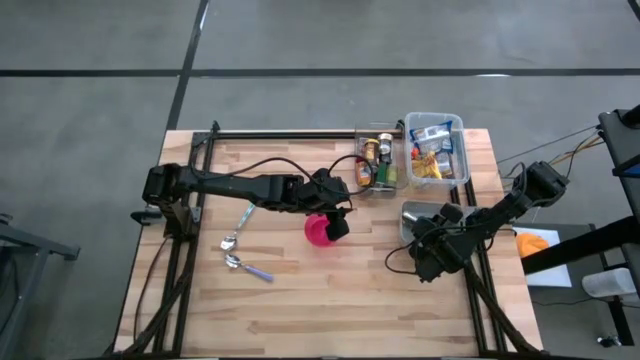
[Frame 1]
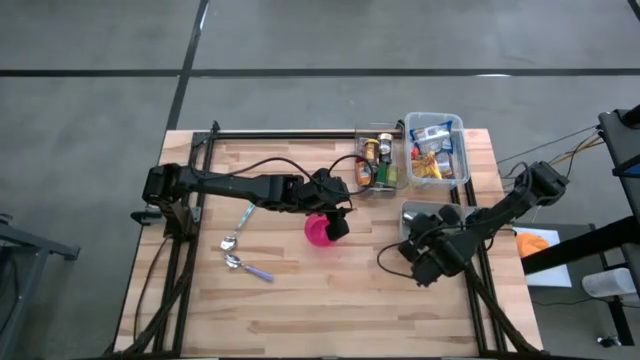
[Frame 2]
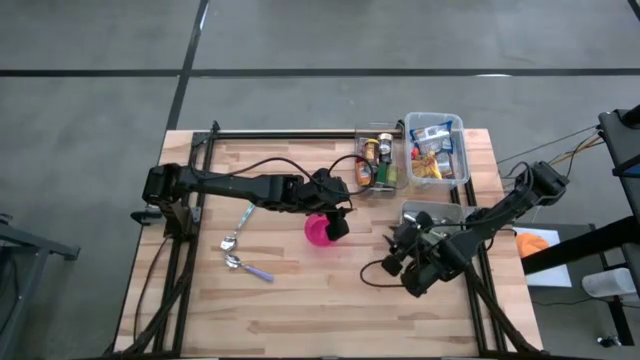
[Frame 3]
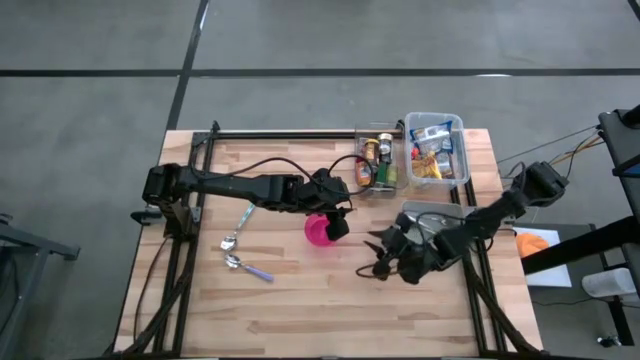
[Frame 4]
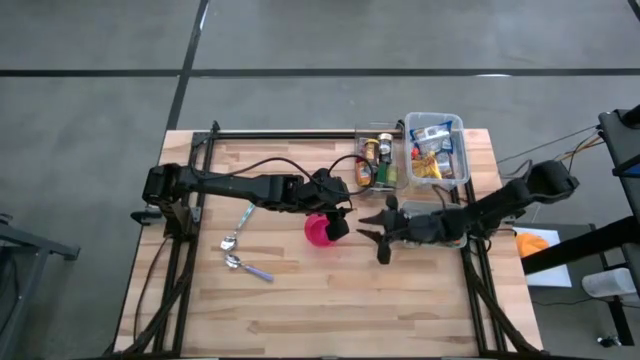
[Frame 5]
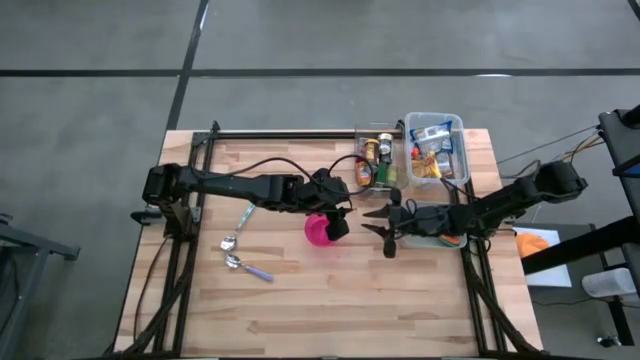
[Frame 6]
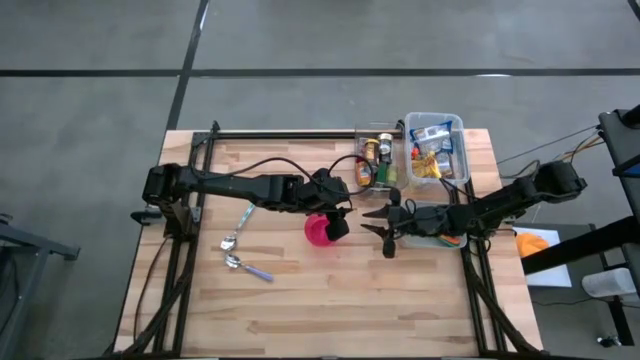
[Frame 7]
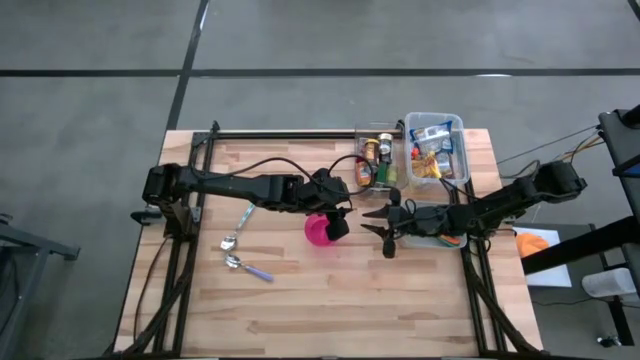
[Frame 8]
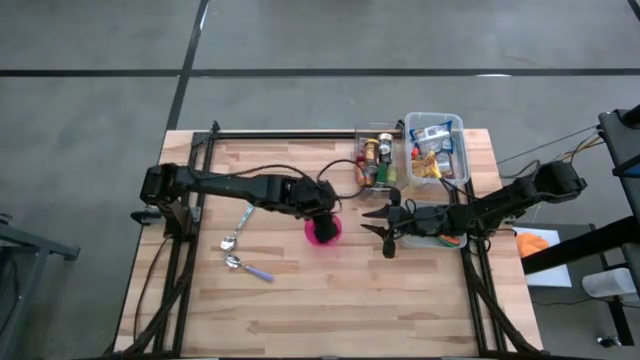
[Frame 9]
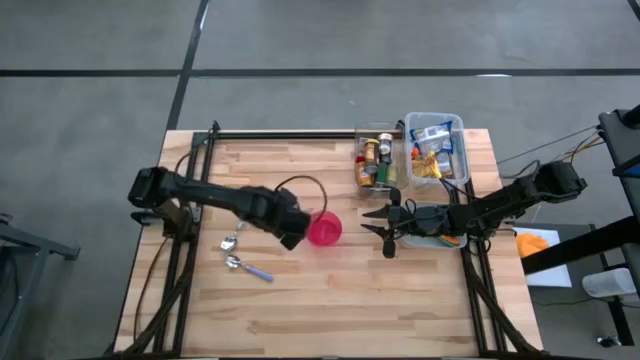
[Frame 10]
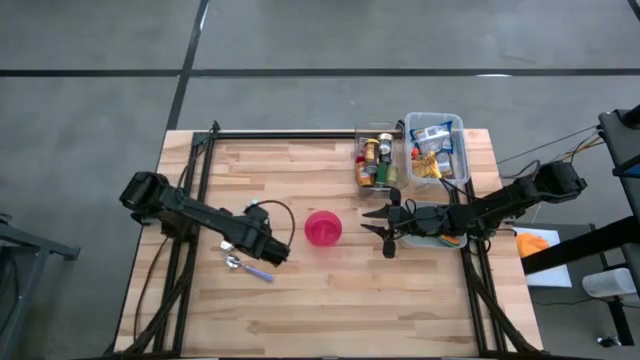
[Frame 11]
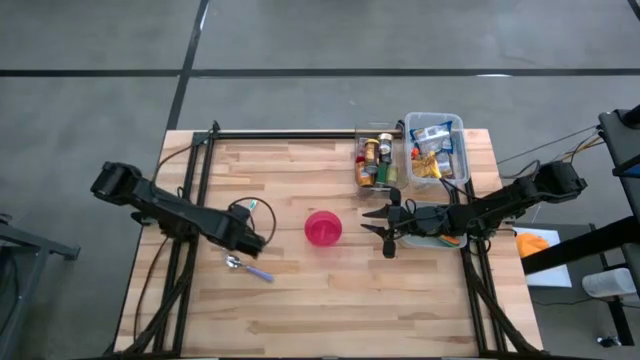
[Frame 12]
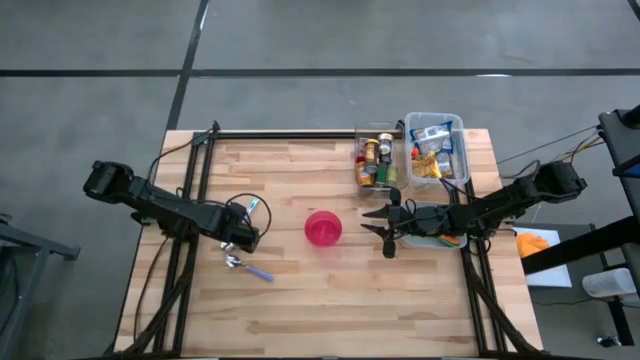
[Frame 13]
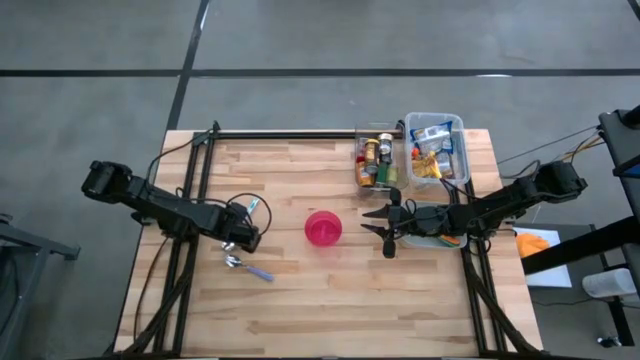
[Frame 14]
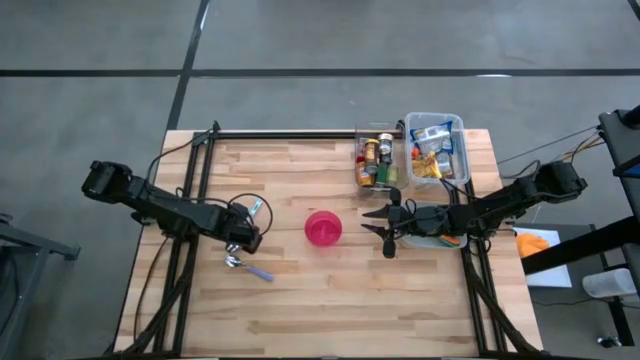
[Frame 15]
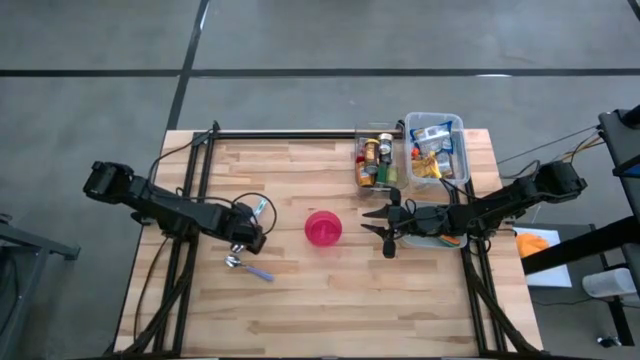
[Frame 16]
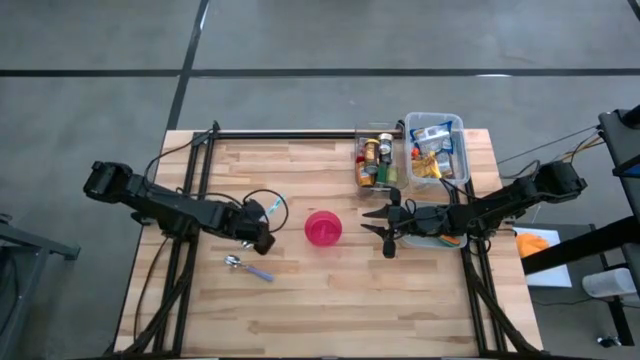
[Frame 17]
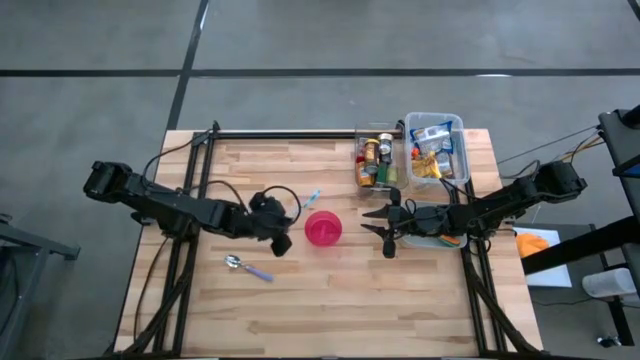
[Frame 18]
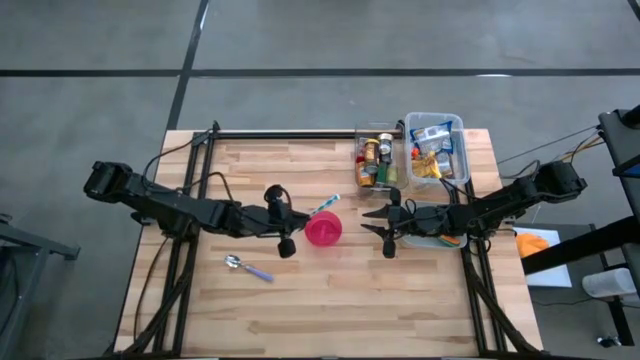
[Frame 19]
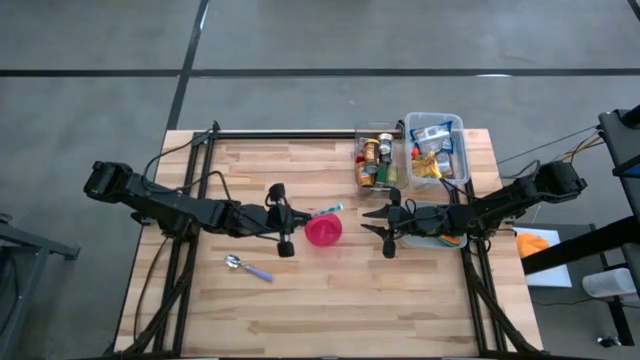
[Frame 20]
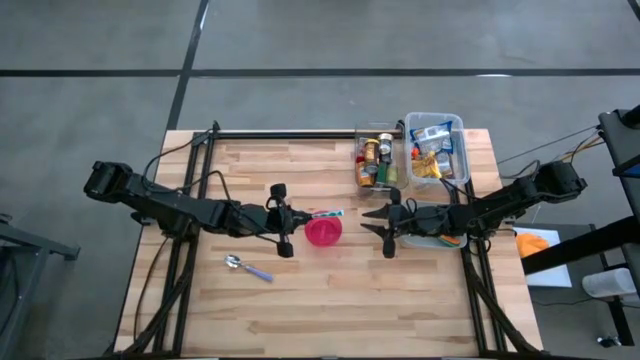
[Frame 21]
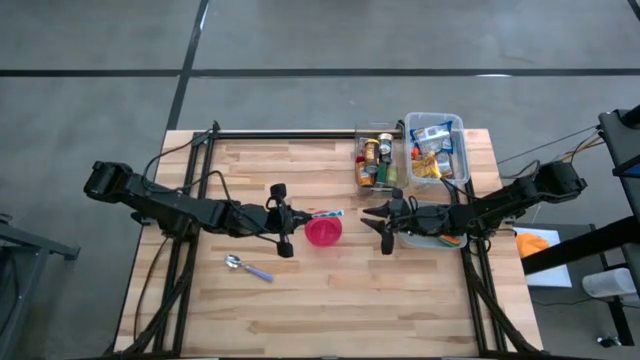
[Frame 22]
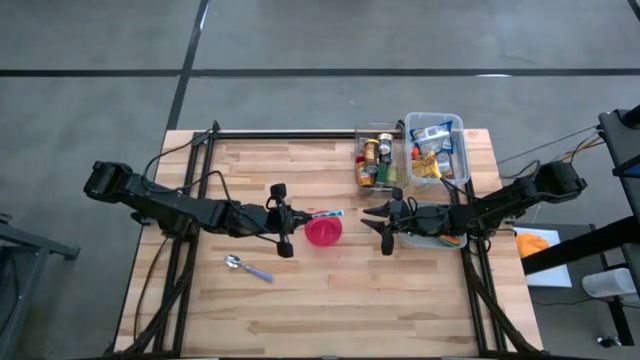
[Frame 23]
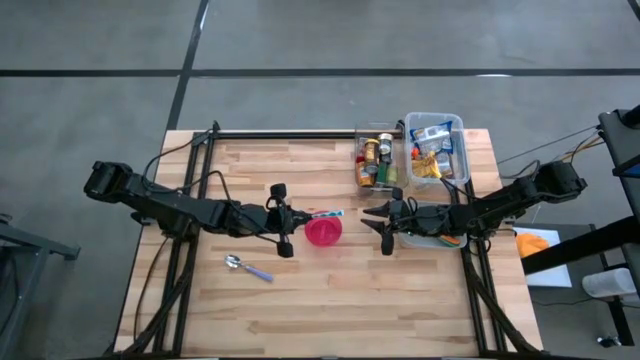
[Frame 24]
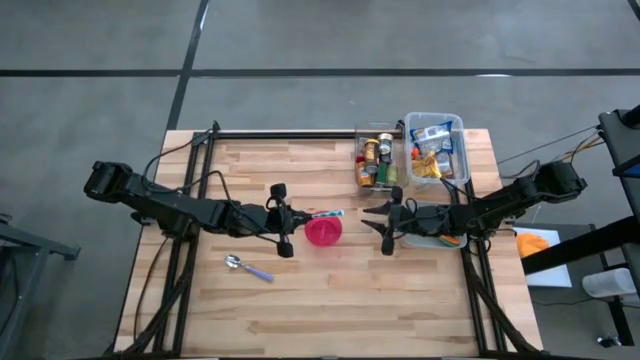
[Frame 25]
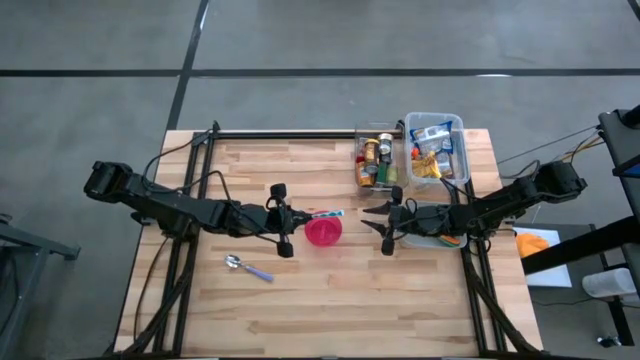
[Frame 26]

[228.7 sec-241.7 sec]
Put the blue patterned spoon into the gray bin
